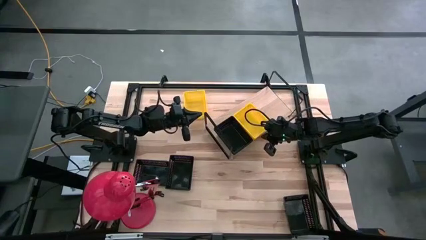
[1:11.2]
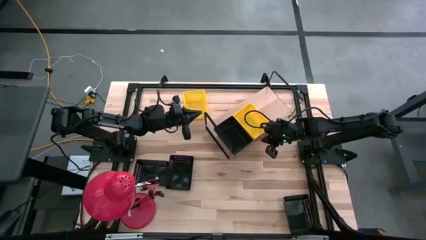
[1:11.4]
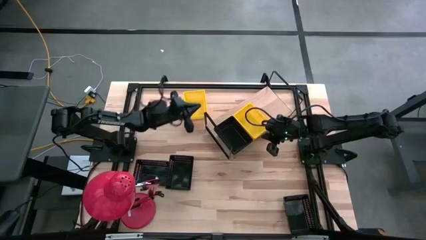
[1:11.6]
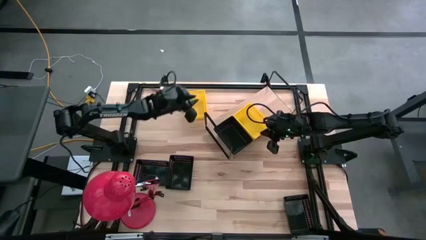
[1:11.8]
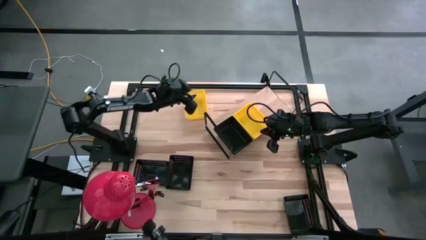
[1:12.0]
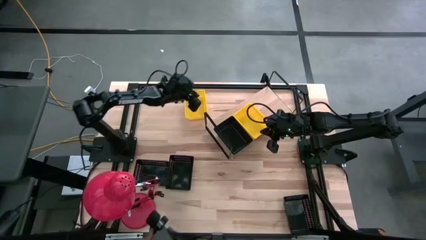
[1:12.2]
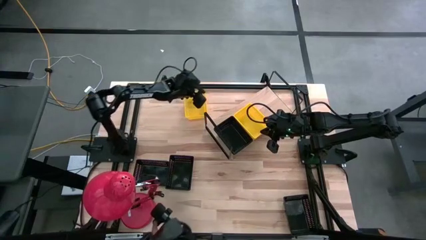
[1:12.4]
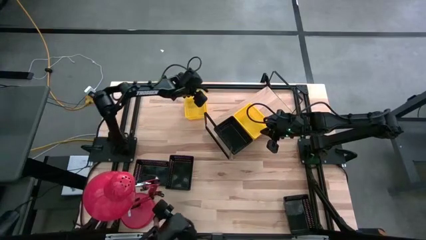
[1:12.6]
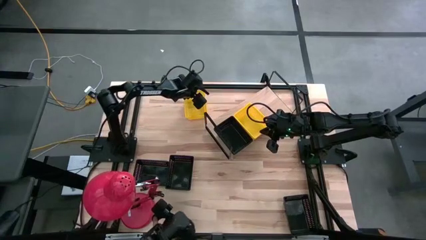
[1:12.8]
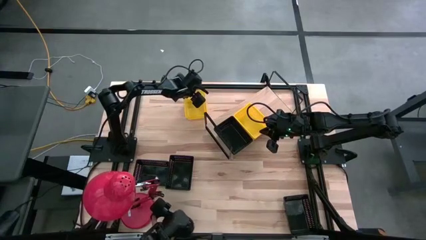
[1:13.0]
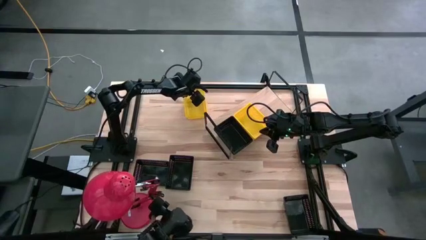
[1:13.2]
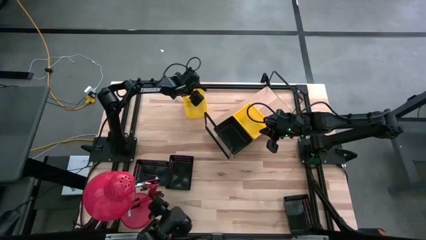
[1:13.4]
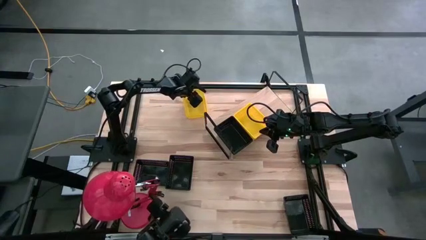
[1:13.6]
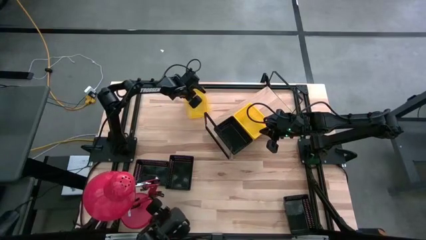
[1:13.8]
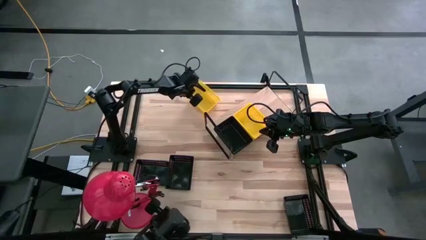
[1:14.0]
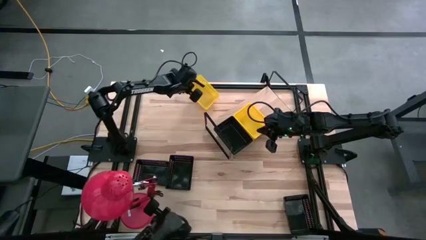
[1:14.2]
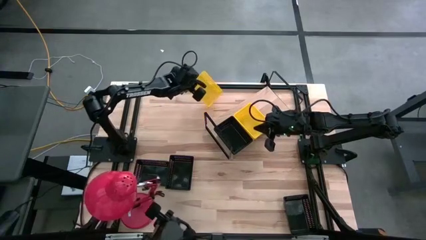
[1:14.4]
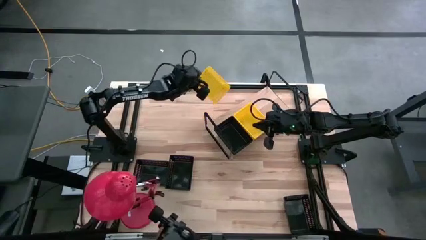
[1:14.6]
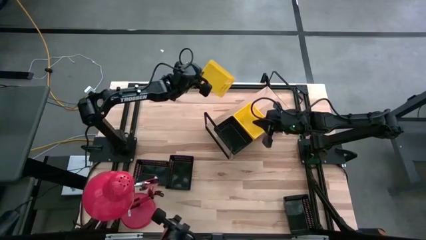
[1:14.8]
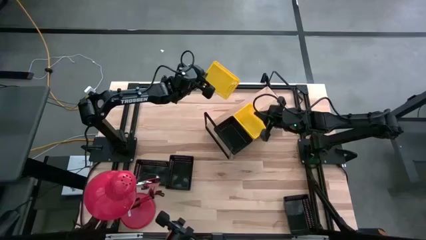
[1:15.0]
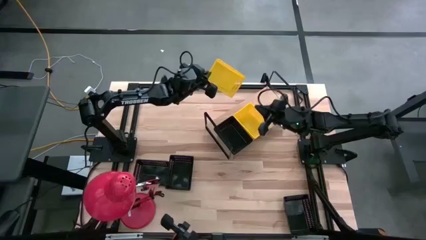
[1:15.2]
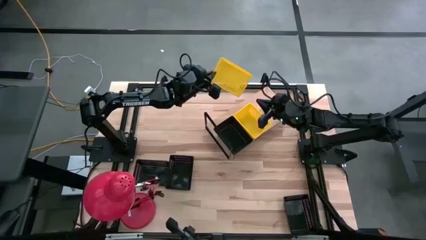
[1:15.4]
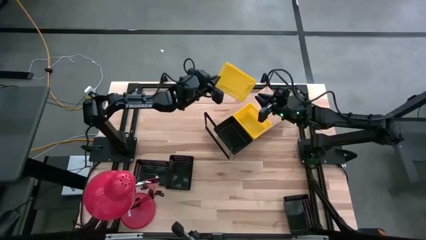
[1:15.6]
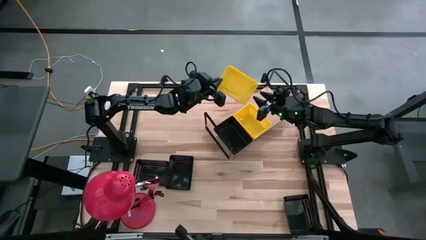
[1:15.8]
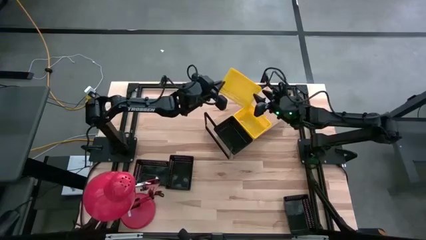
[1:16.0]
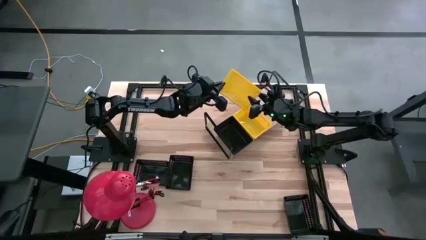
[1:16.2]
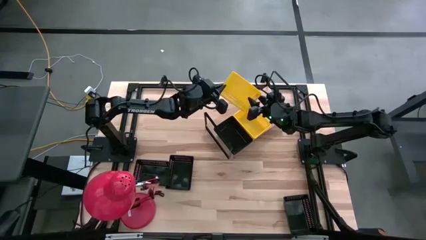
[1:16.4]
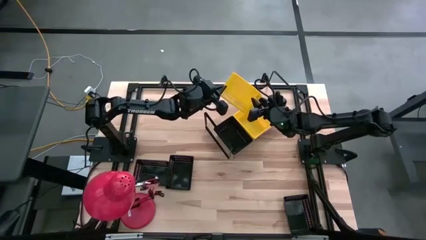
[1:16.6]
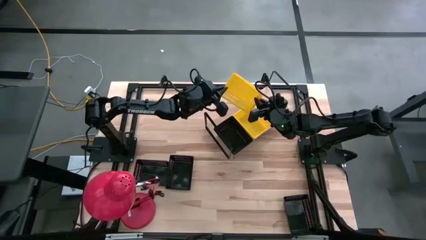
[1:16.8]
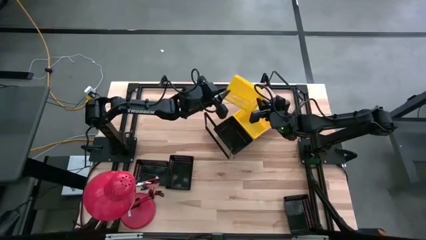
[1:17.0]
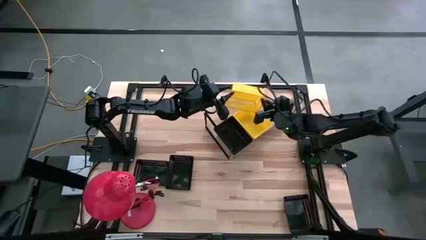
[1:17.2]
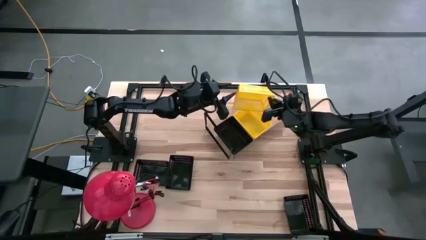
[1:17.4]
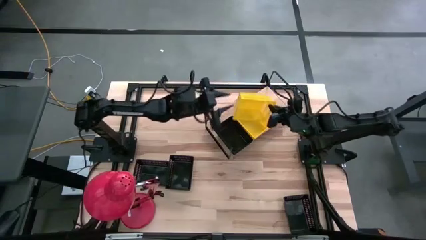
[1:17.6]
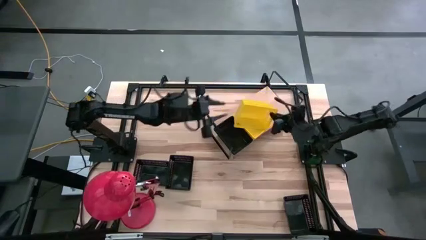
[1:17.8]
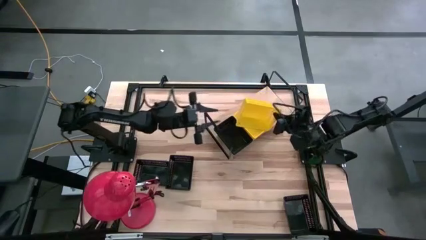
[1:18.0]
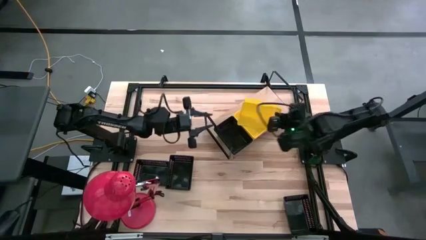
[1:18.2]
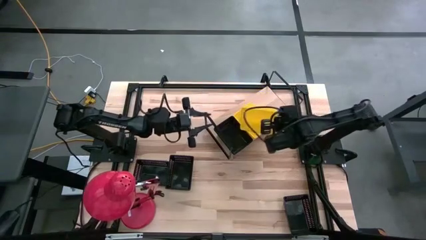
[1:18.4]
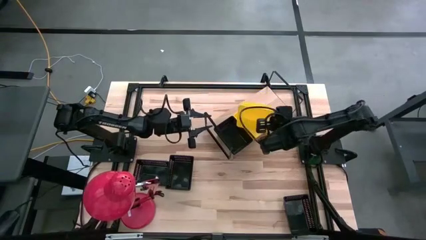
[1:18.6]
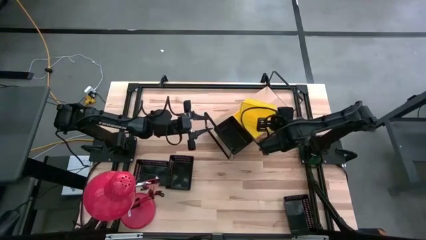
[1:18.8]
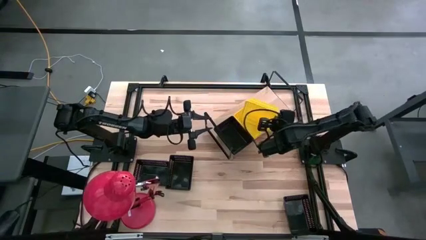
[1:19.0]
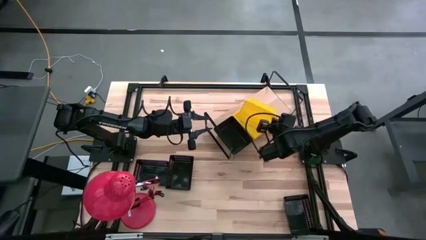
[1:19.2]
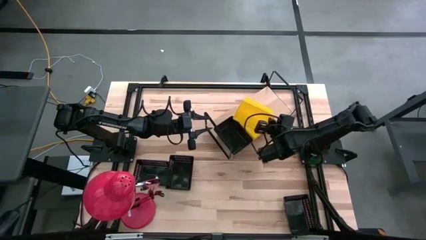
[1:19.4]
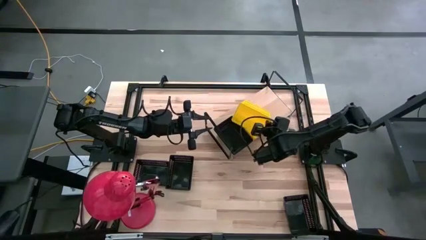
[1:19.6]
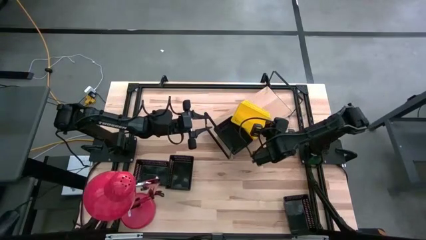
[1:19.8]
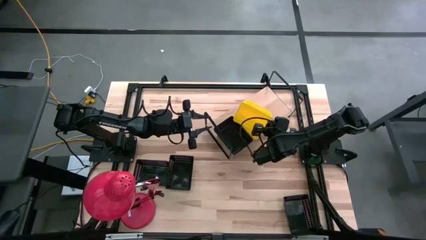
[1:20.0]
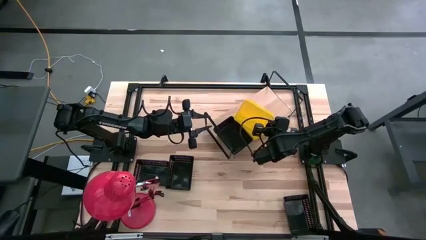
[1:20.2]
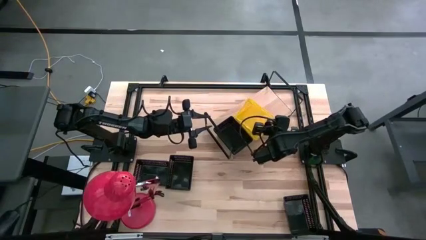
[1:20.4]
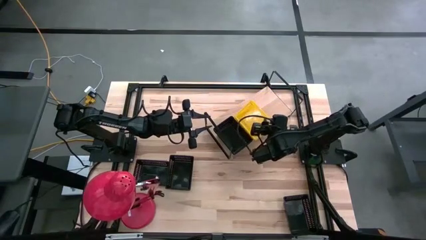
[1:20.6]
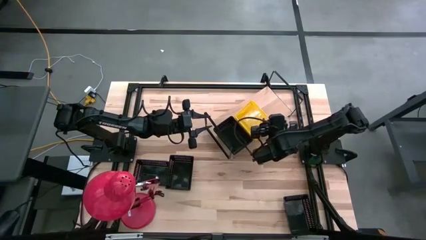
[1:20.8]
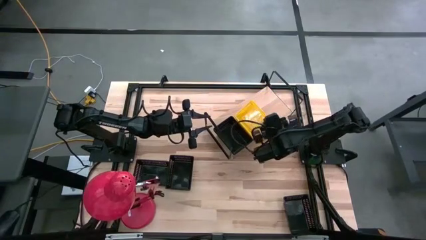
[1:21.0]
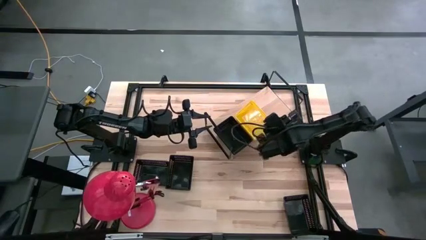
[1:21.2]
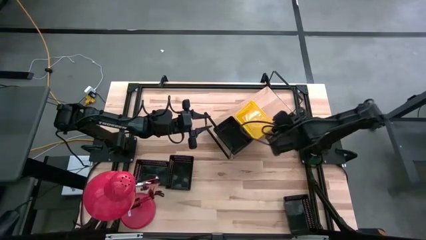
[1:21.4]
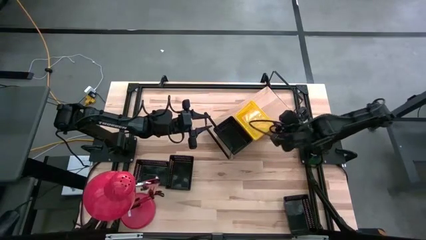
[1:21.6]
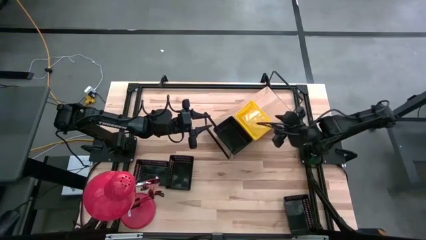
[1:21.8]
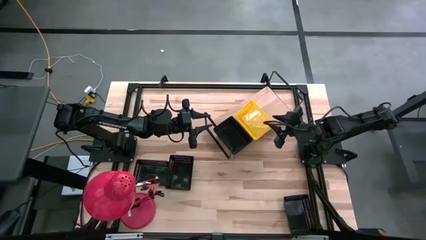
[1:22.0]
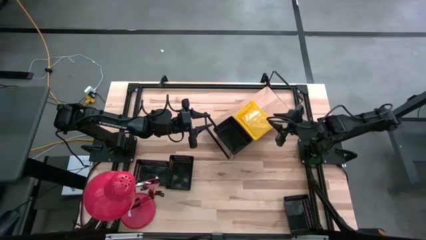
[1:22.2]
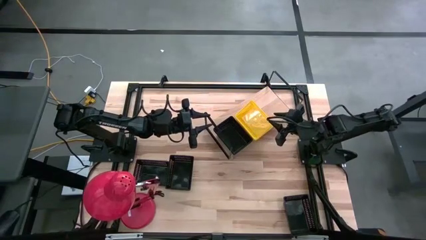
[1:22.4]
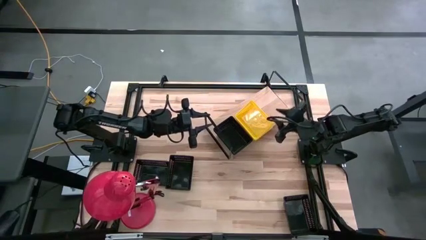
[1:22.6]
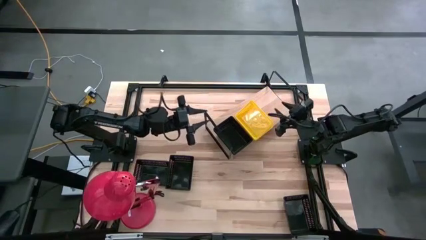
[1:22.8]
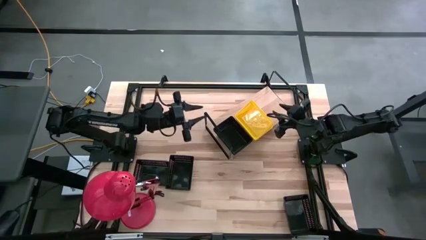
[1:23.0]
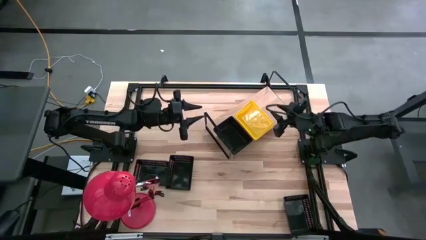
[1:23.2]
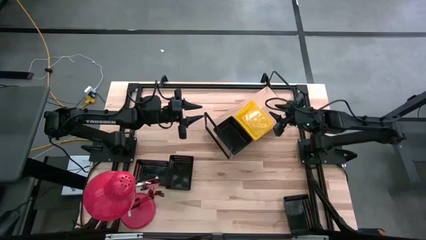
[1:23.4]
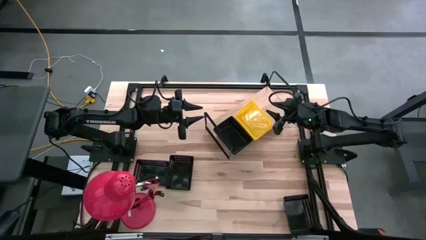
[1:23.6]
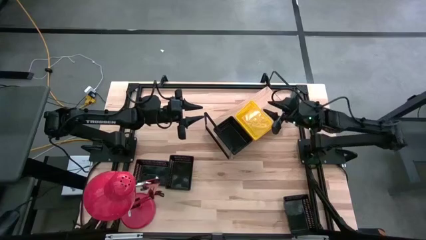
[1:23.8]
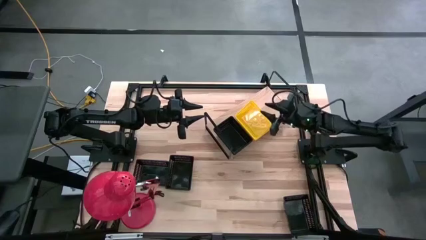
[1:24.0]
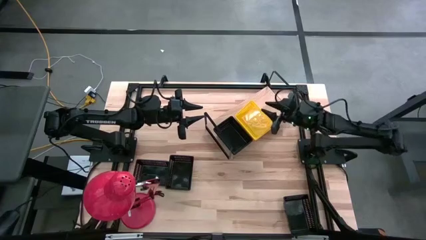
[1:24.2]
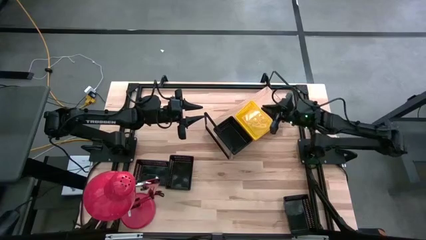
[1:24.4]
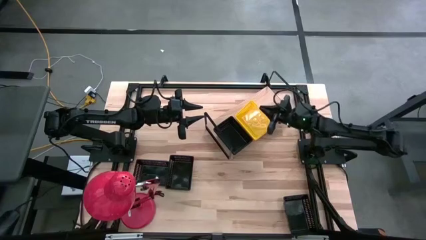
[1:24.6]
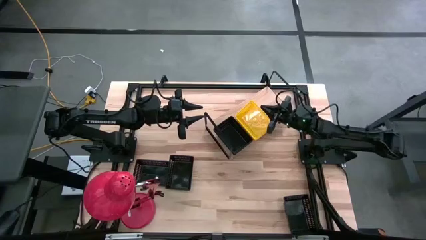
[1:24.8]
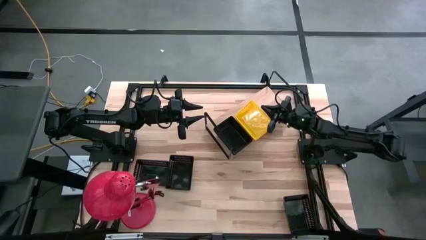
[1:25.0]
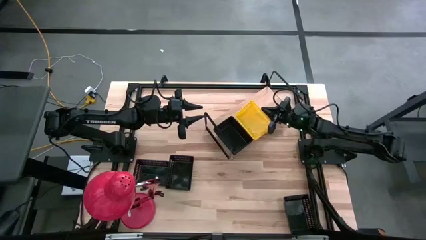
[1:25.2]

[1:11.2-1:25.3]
Task: Stack baskets on shelf by color
Stack the yellow bin on top of the yellow bin on the shelf

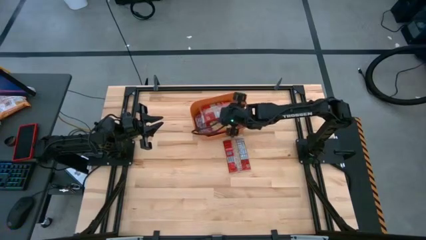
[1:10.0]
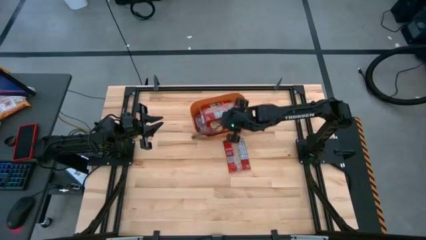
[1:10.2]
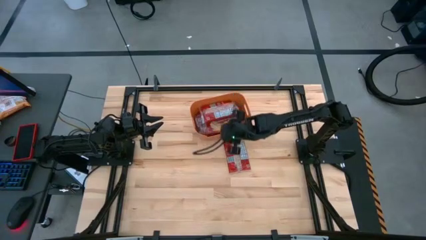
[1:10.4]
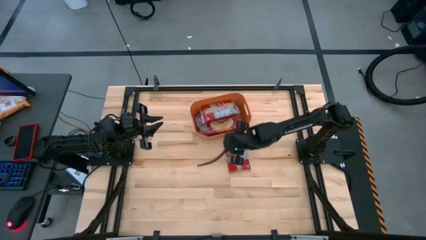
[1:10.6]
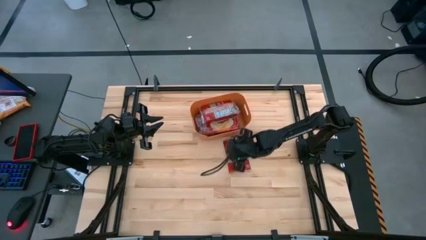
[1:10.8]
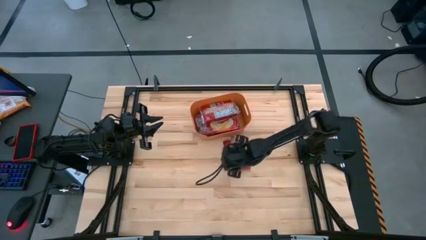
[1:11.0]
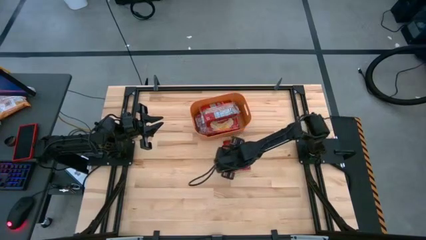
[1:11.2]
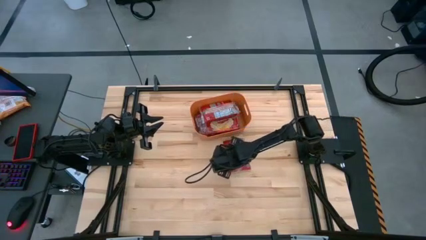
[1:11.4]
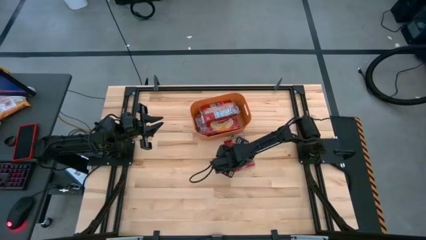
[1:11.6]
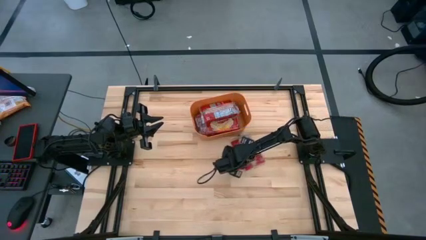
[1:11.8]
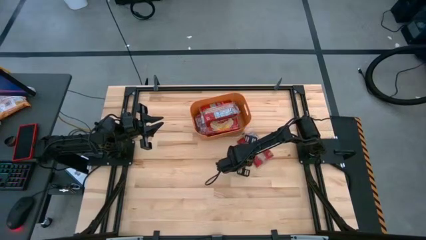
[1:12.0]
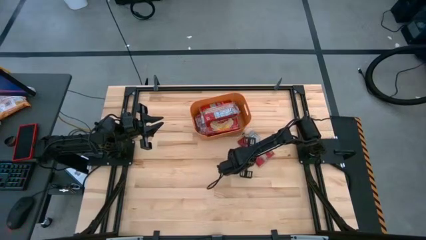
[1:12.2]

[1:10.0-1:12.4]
Task: Sort popcorn bags into baskets
Put the red popcorn bag into the orange bin
